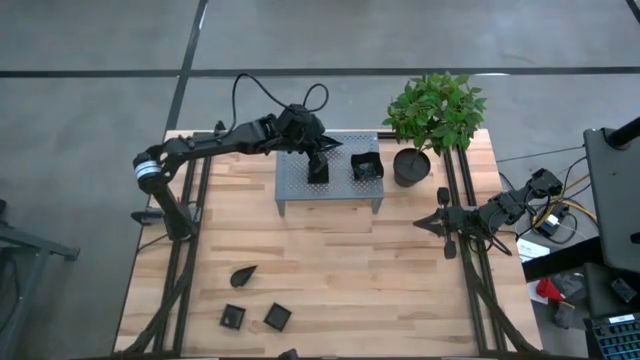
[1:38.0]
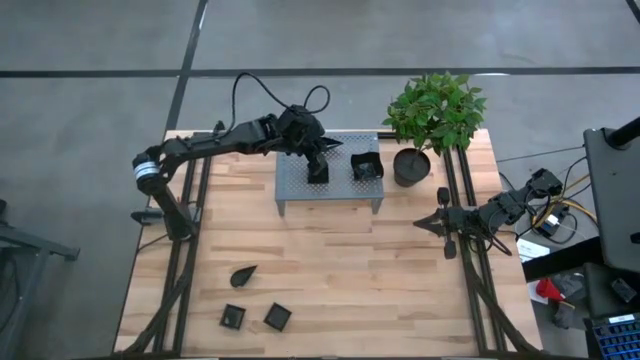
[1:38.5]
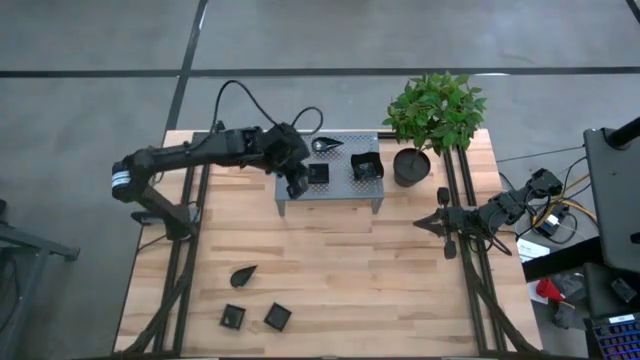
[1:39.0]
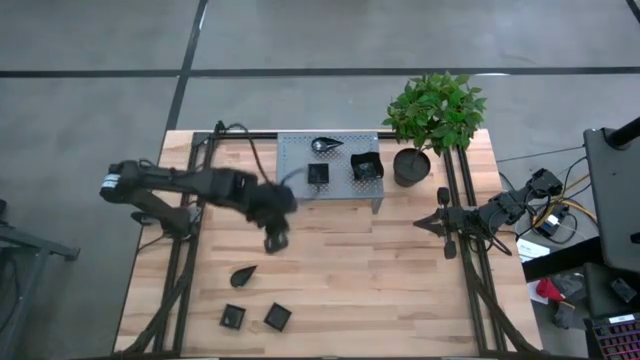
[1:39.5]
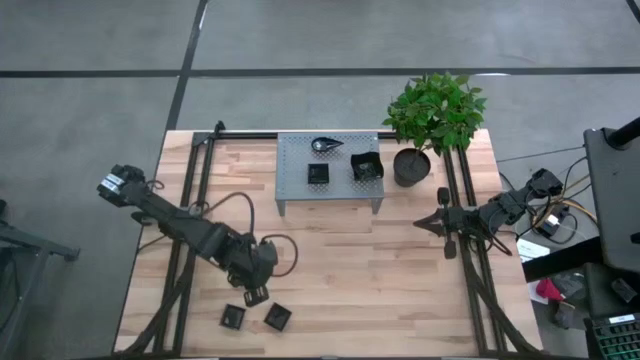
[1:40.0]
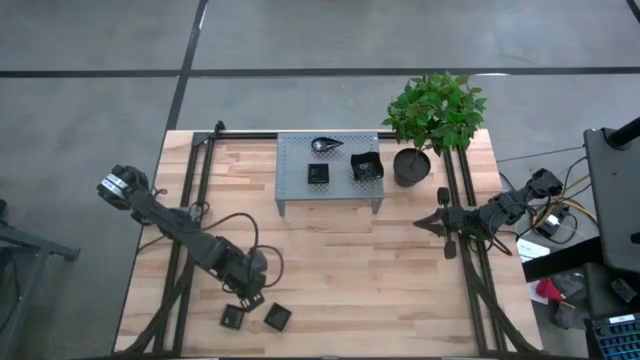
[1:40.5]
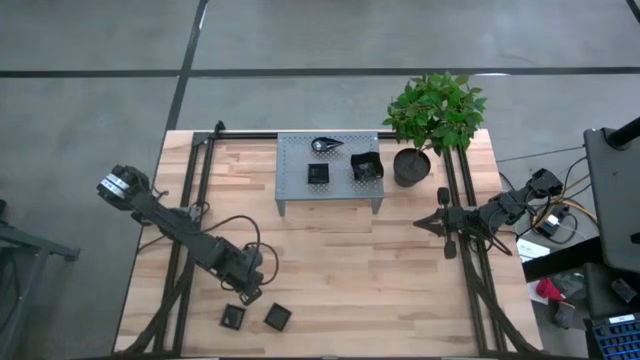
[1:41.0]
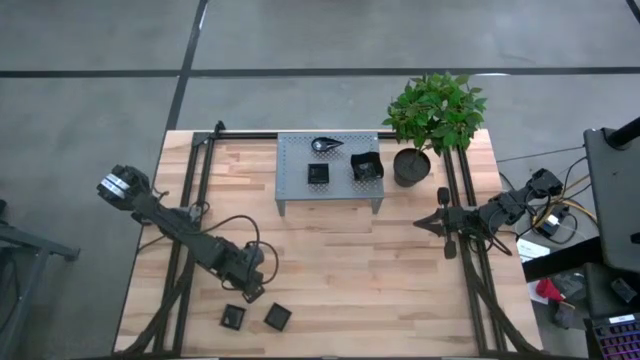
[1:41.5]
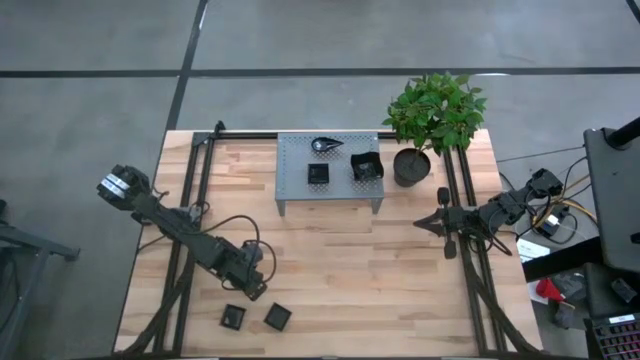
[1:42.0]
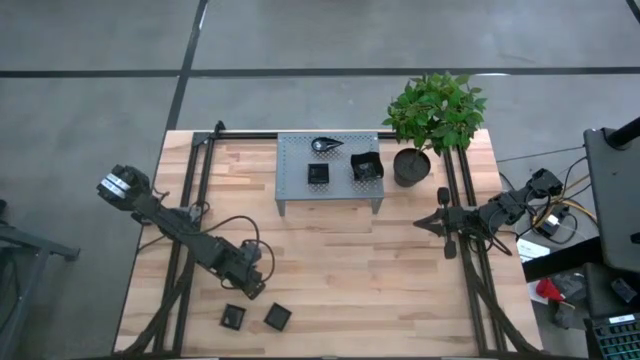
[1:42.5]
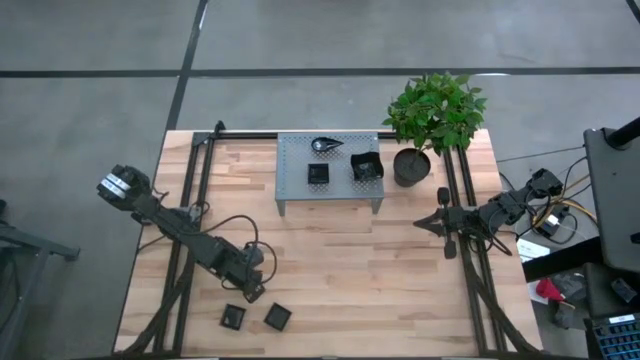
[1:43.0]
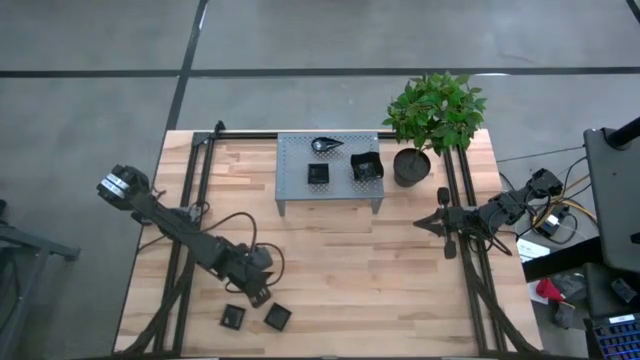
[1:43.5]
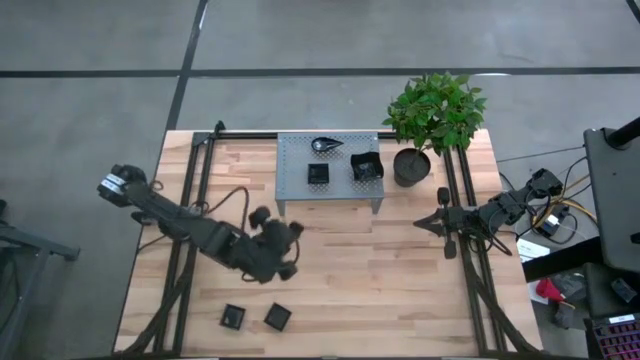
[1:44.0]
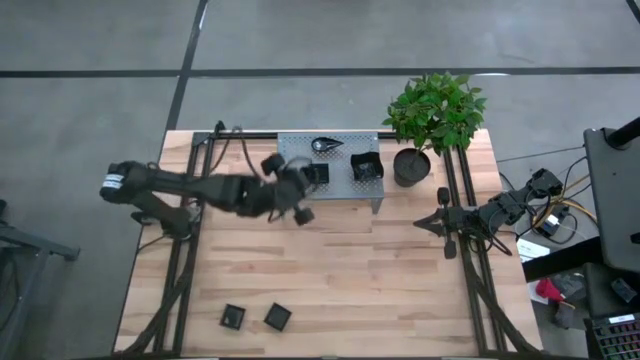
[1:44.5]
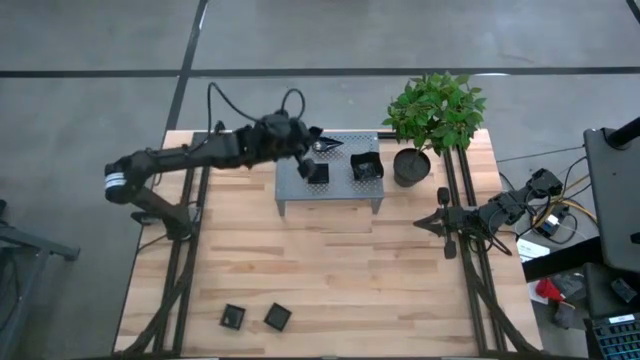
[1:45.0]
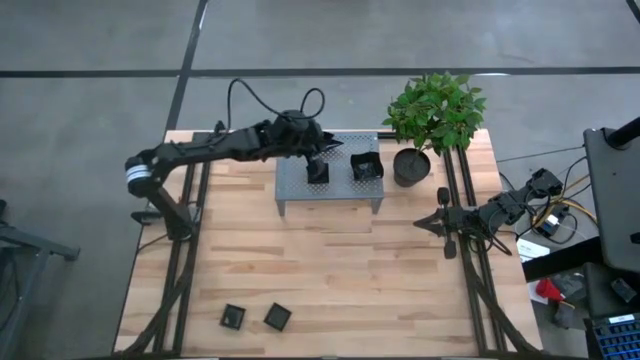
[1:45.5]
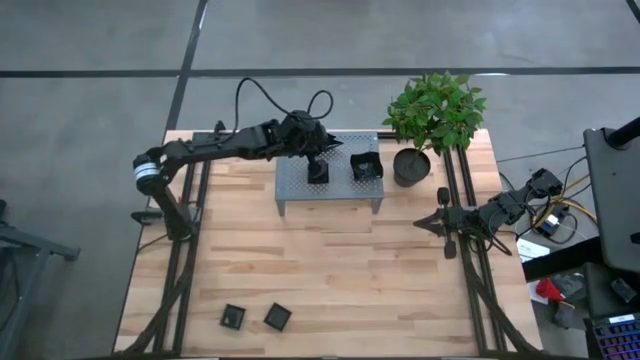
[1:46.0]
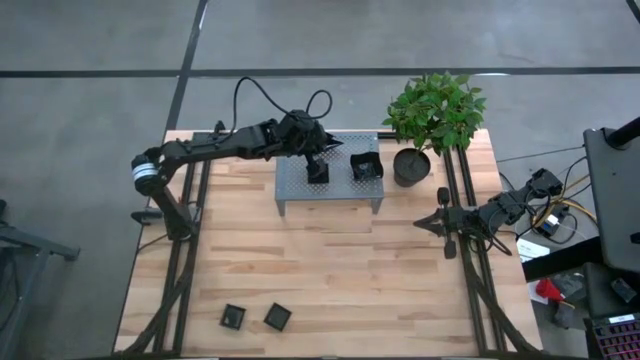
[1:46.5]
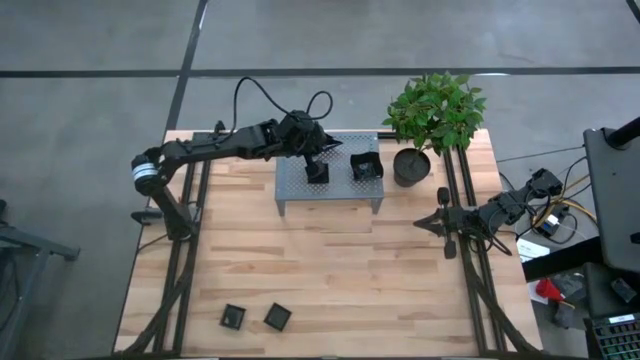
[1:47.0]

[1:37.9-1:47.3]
Task: Pick & Place Mini shaped plates
Stack the black drop-shaped plate on top of the black drop-shaped plates on the shelf

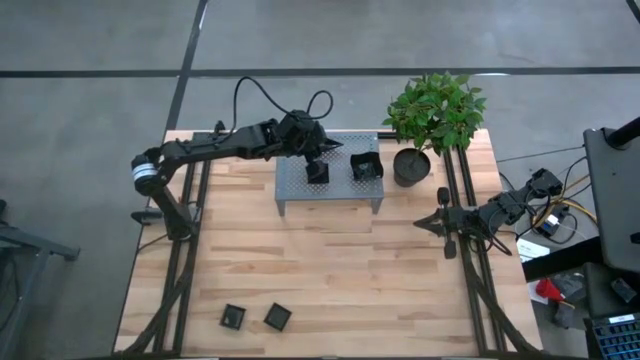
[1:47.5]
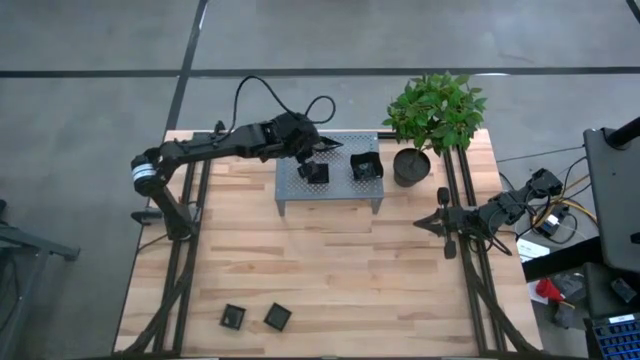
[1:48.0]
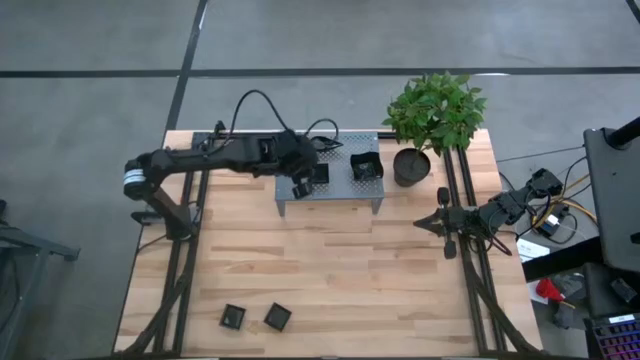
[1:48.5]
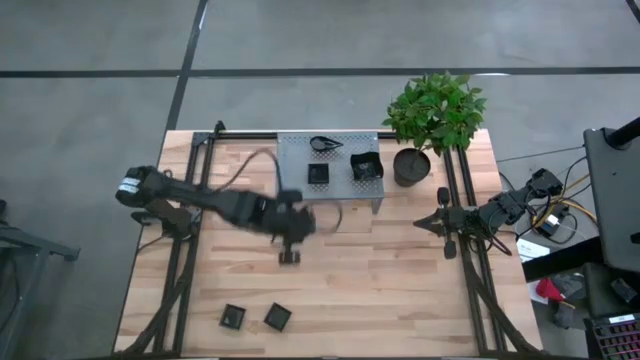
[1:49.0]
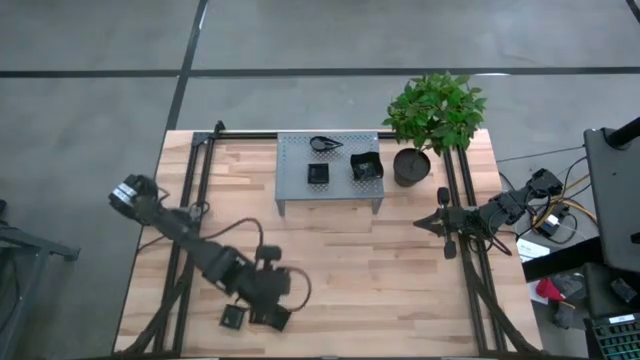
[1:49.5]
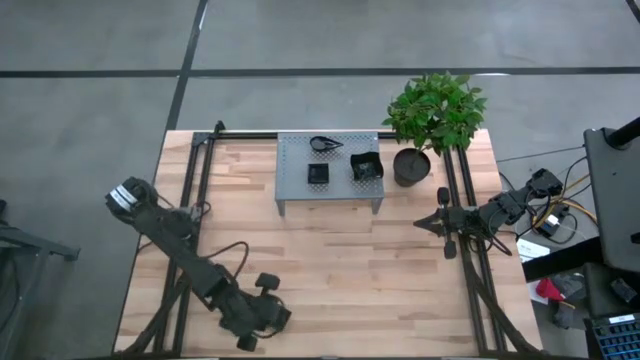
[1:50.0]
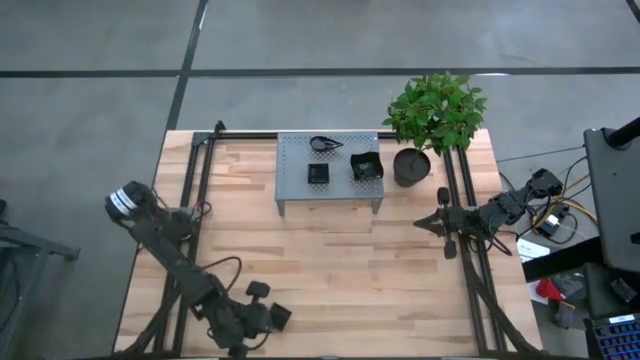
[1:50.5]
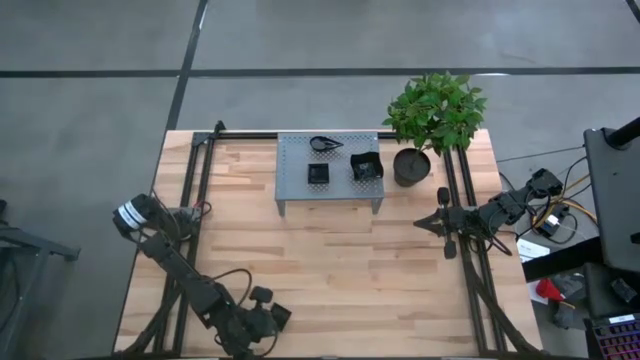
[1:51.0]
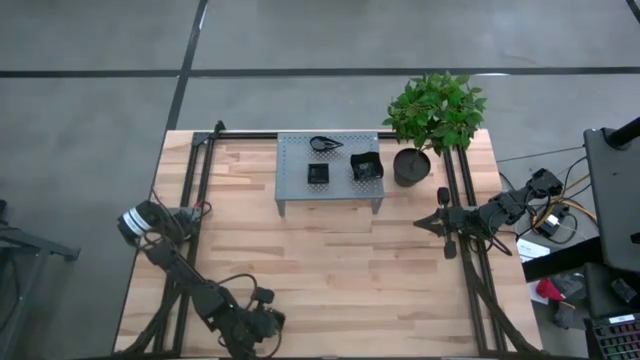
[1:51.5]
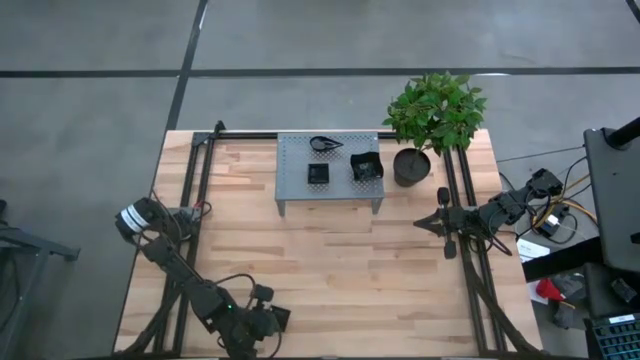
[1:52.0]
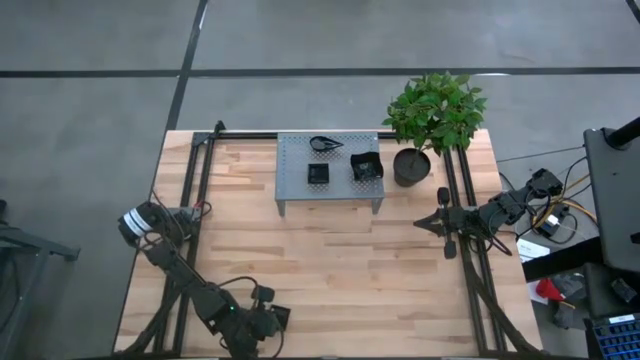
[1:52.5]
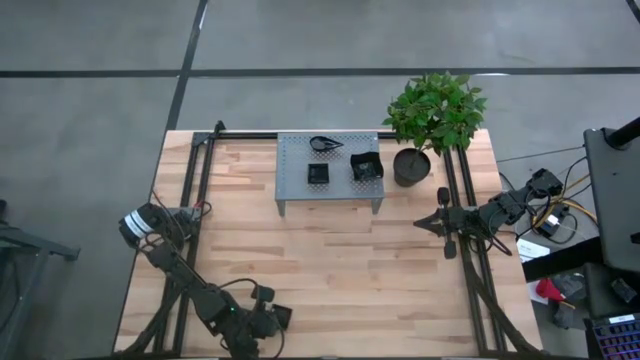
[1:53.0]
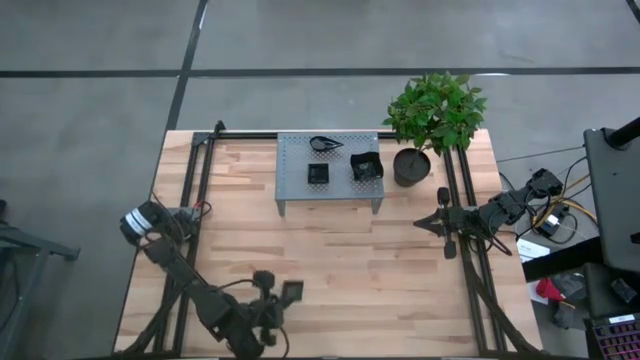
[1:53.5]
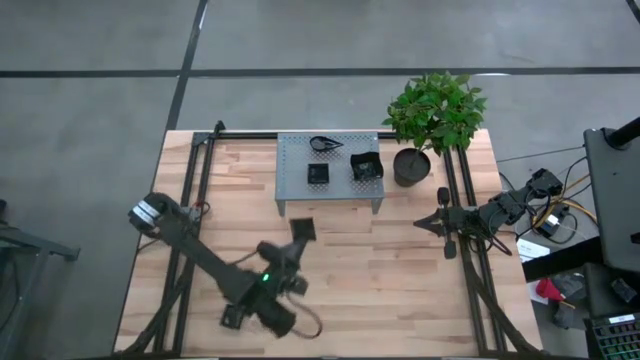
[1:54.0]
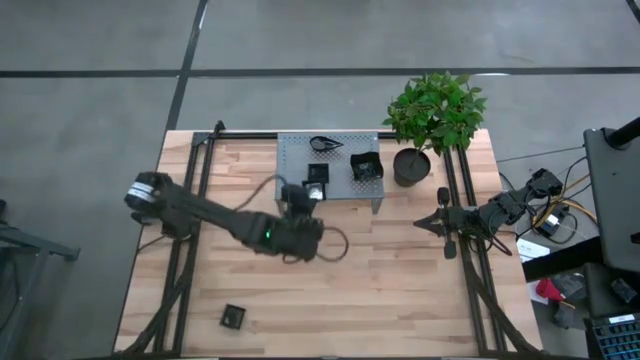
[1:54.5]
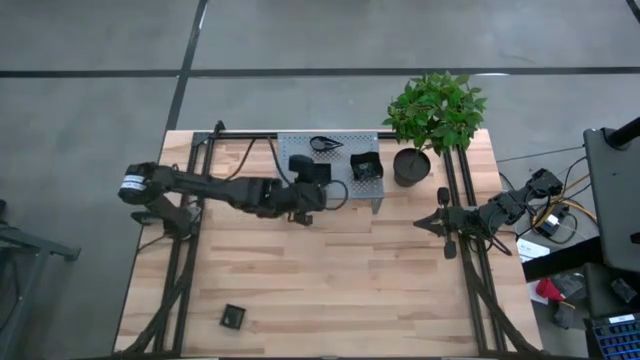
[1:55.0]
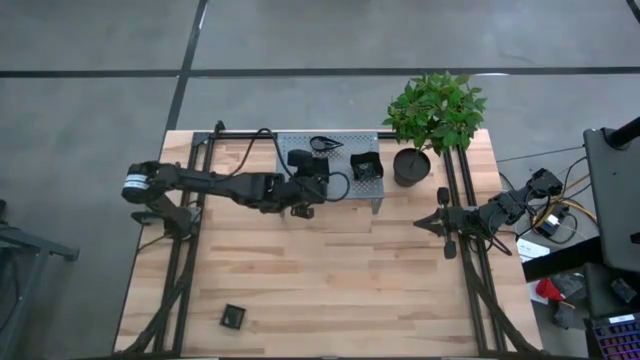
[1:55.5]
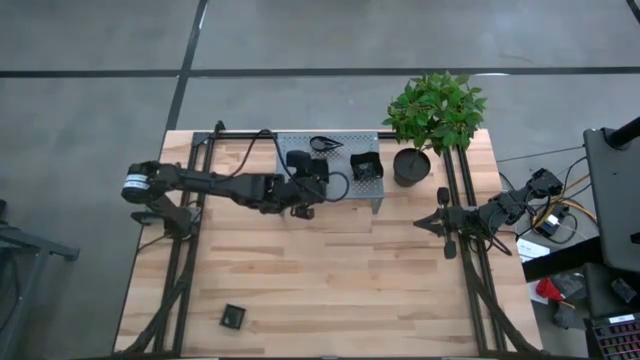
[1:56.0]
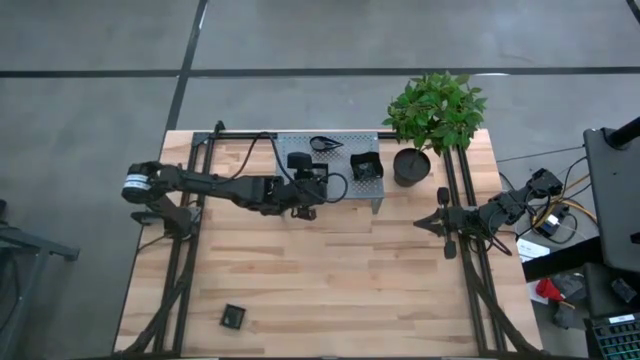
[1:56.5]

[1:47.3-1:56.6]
Stack the black square plate on top of the black square plates on the shelf
